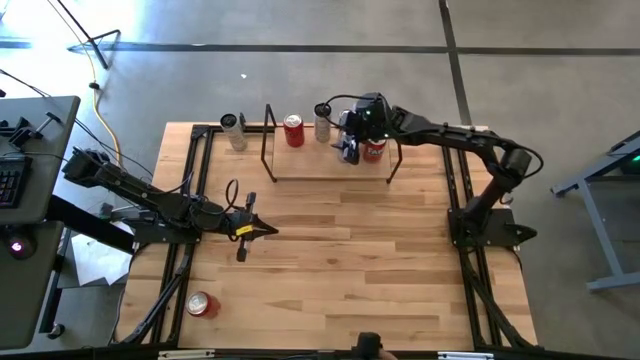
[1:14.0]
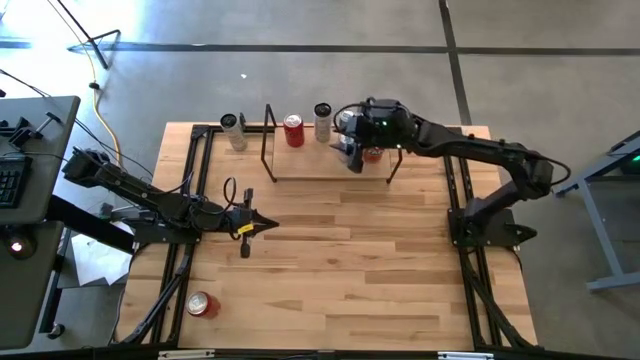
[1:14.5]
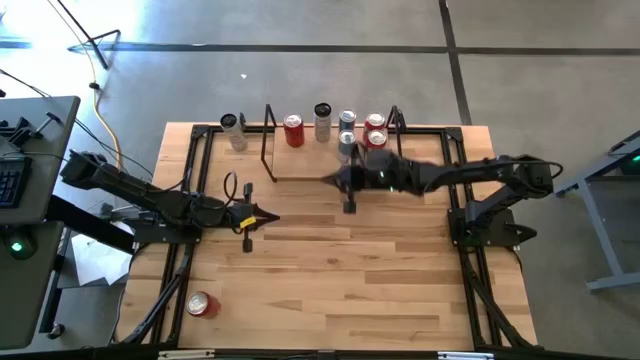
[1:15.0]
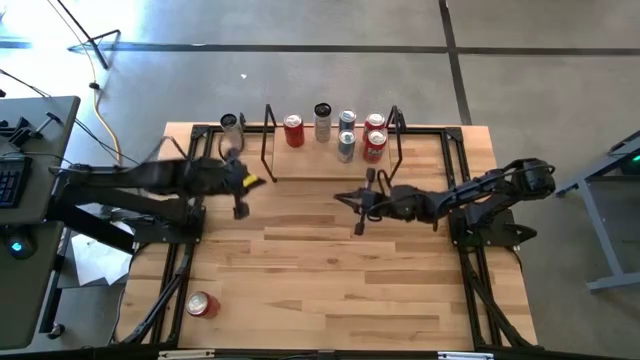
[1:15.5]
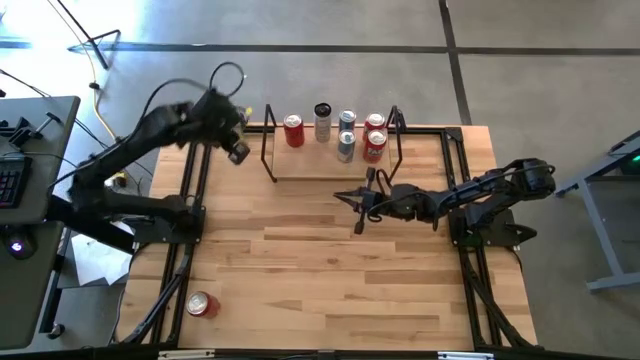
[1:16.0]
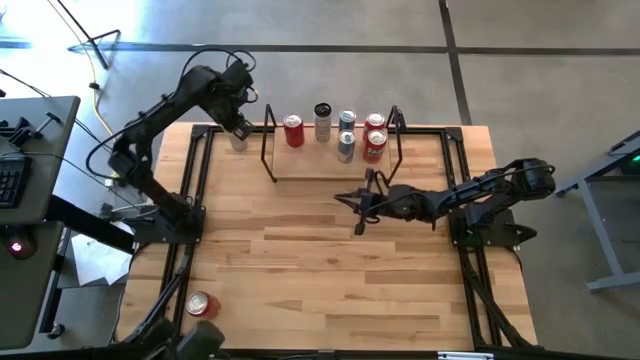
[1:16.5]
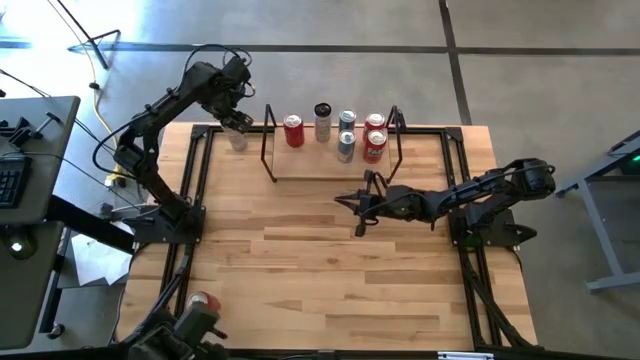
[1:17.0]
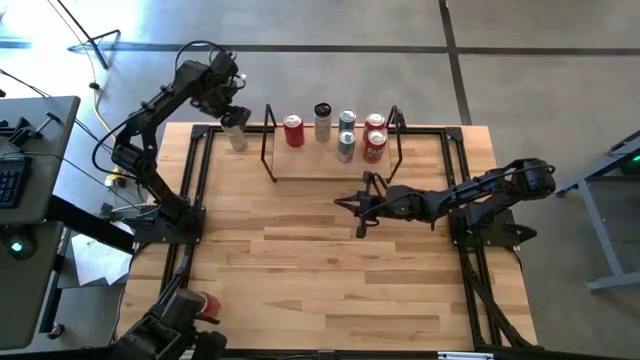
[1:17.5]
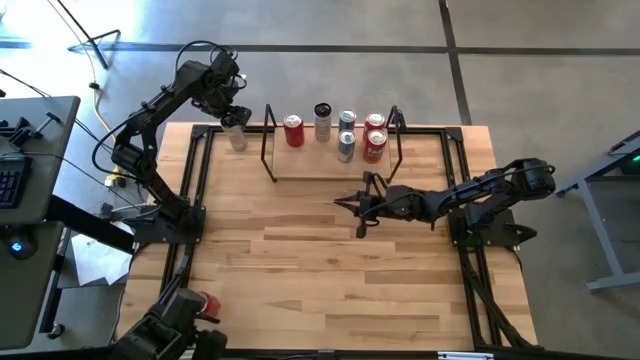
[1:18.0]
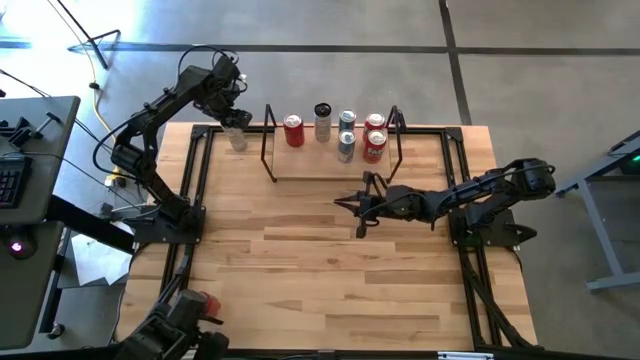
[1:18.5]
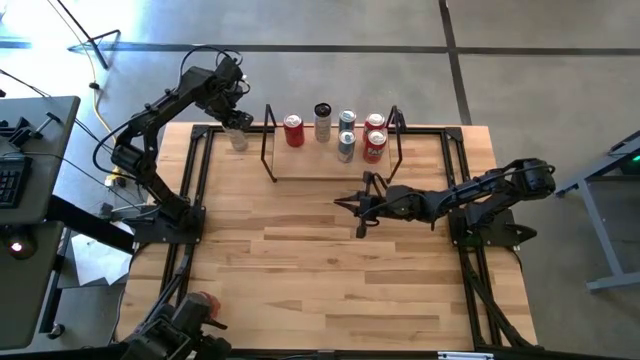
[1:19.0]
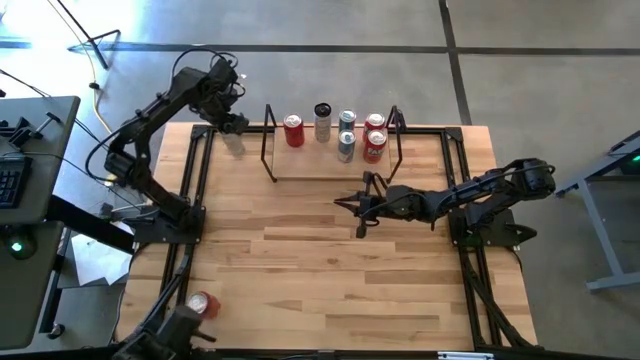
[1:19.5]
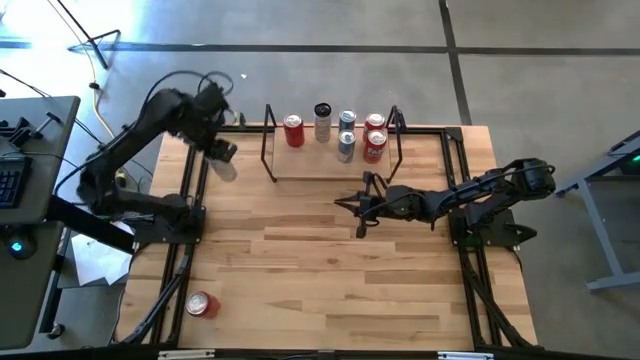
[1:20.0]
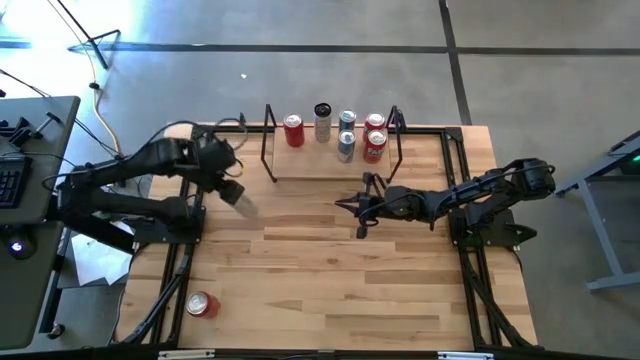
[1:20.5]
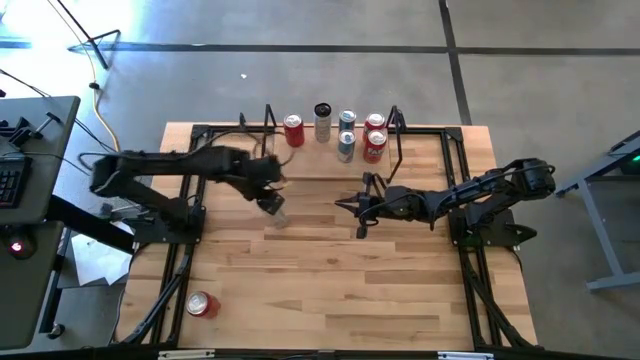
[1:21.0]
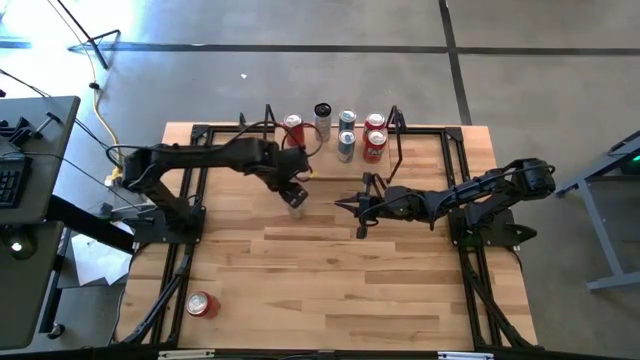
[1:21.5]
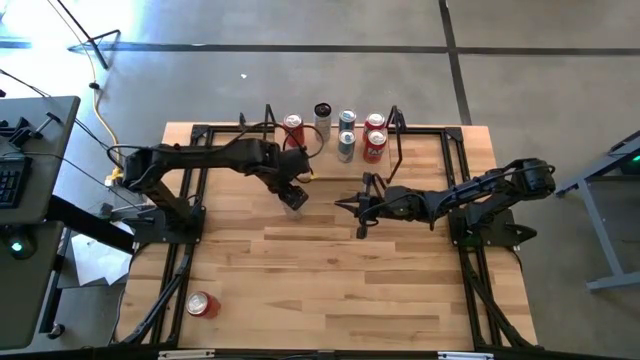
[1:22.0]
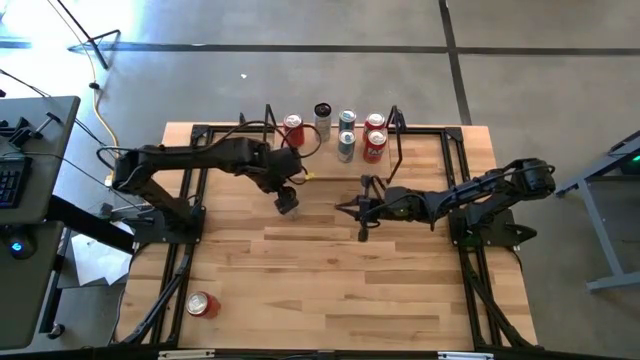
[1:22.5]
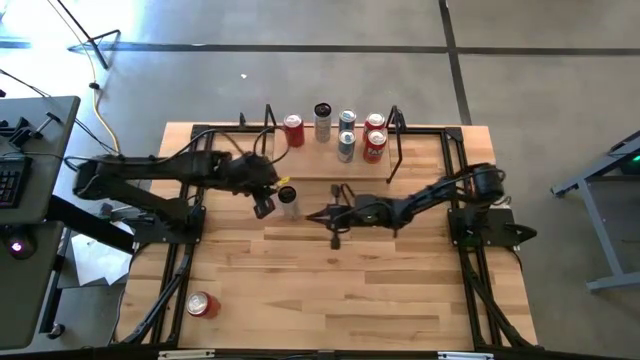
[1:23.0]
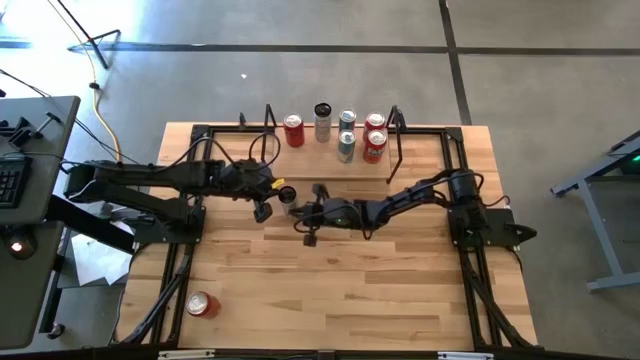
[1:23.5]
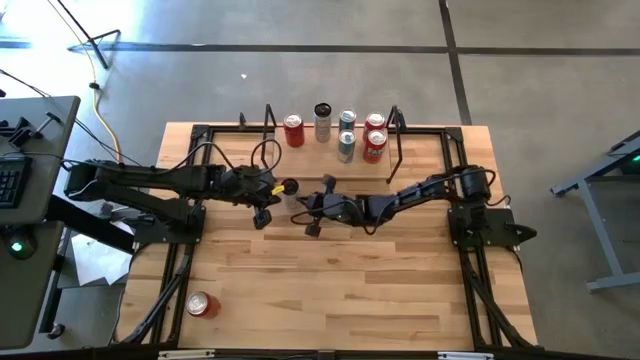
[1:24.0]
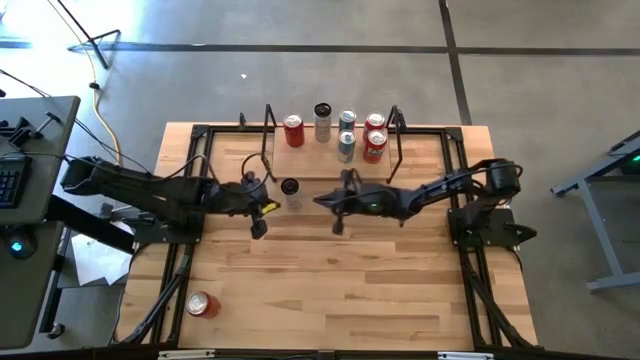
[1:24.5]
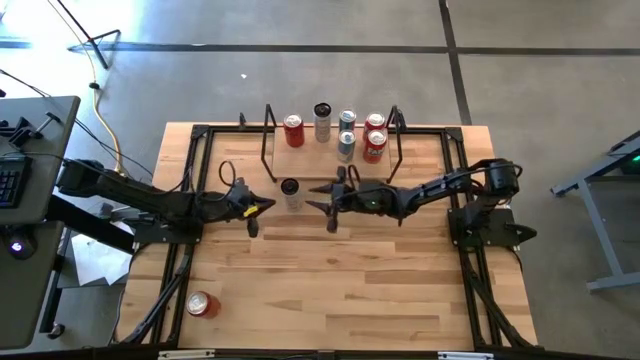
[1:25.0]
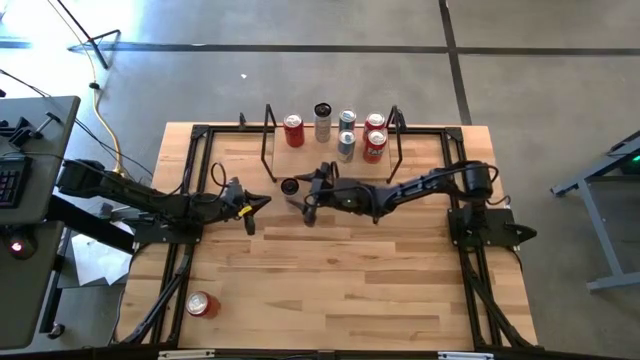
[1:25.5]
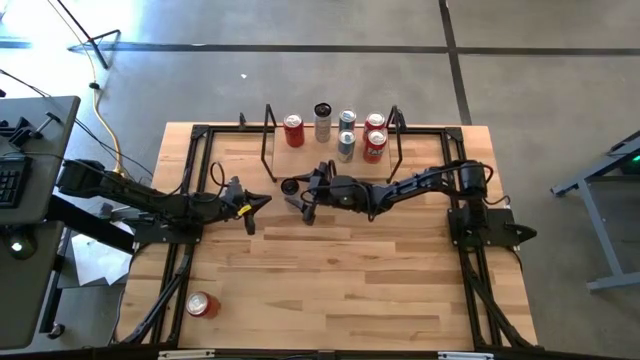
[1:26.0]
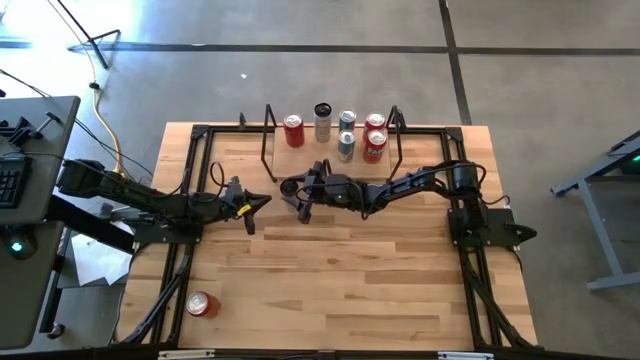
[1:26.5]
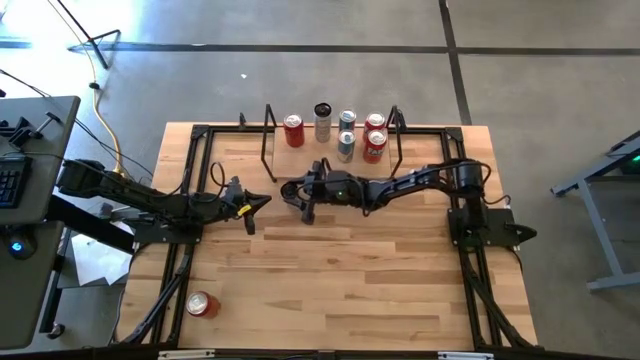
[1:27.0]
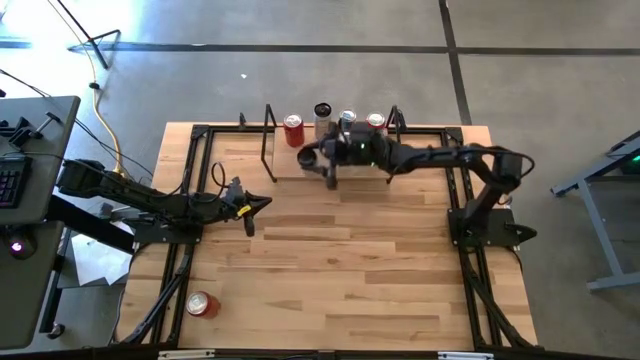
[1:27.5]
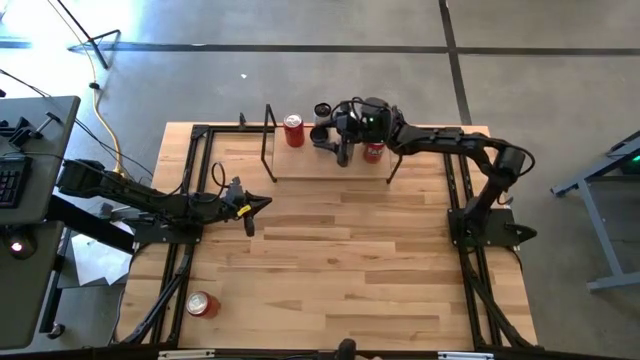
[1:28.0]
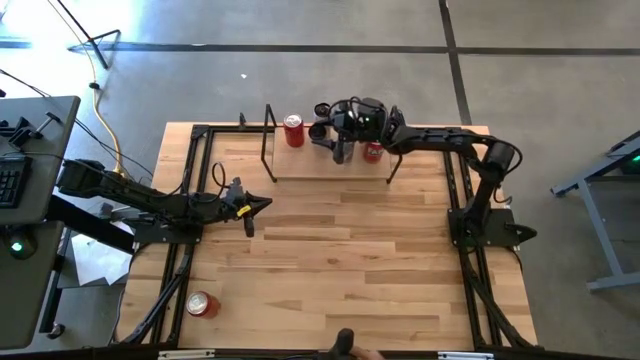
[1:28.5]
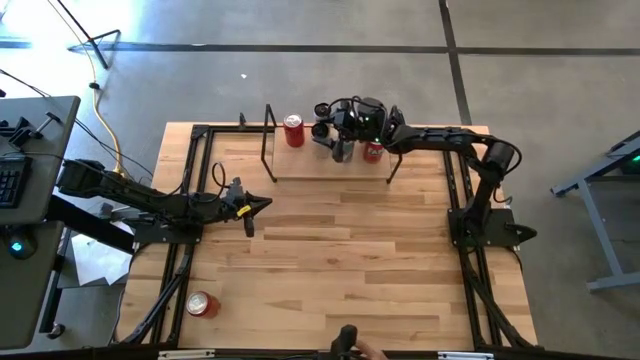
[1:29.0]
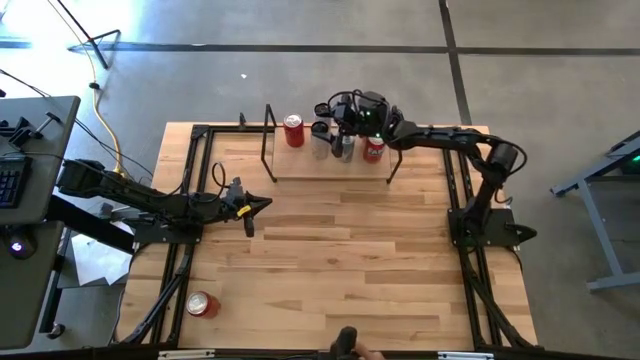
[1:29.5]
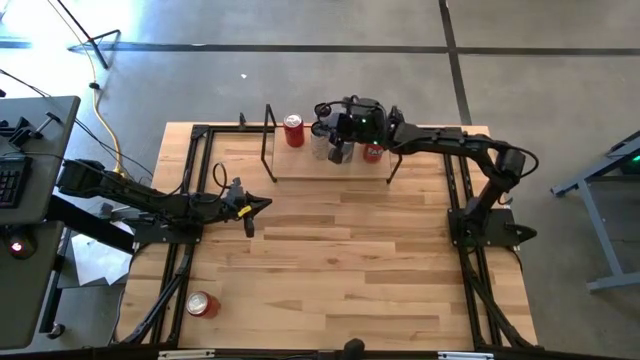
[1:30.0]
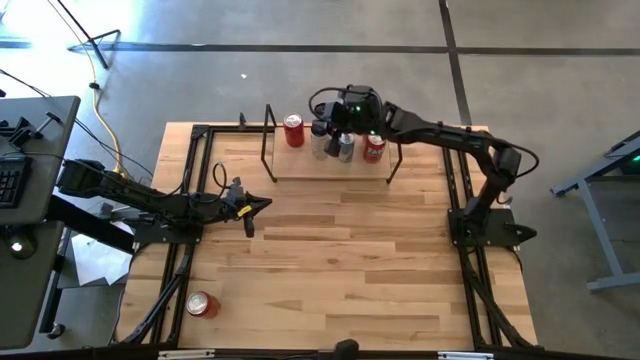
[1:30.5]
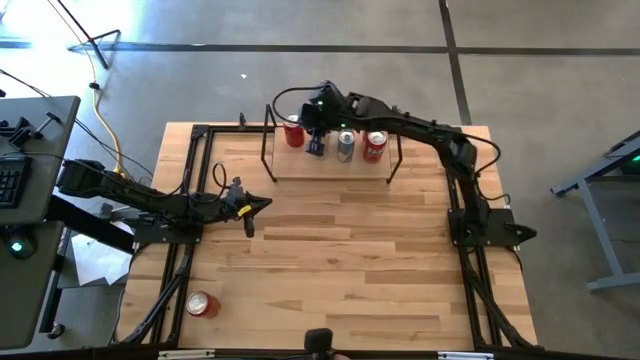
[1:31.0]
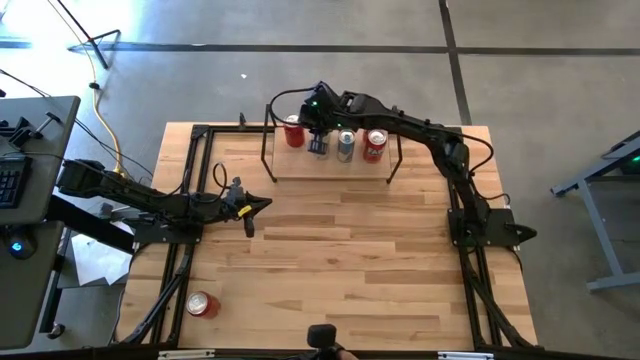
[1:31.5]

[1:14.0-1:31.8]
Task: Place canned beverage on shelf
Put the white yellow soda can on the shelf aligned with the other white yellow soda can

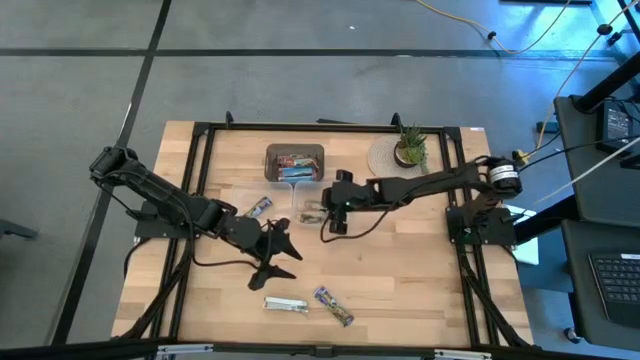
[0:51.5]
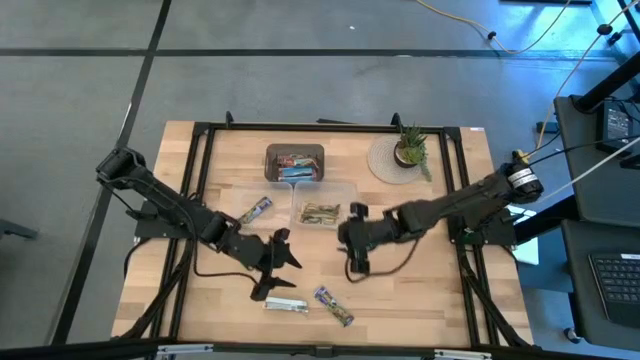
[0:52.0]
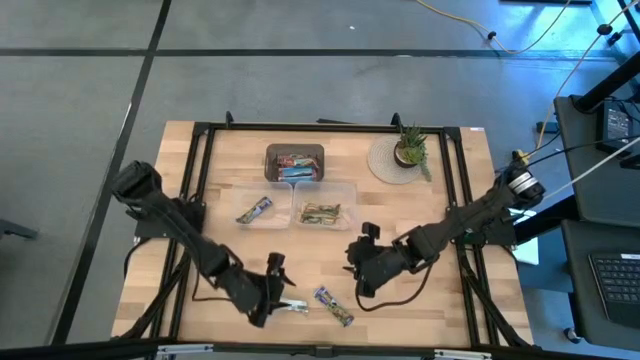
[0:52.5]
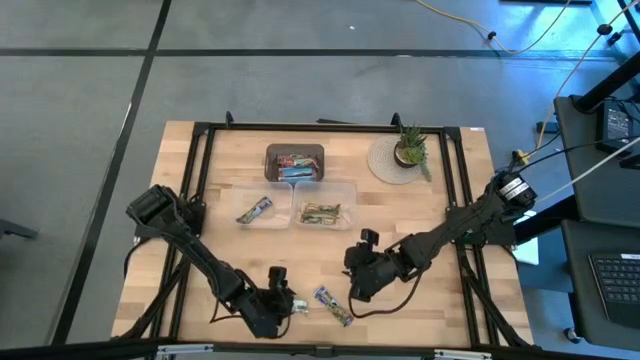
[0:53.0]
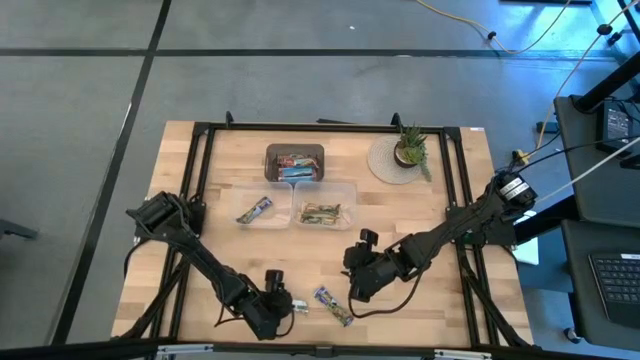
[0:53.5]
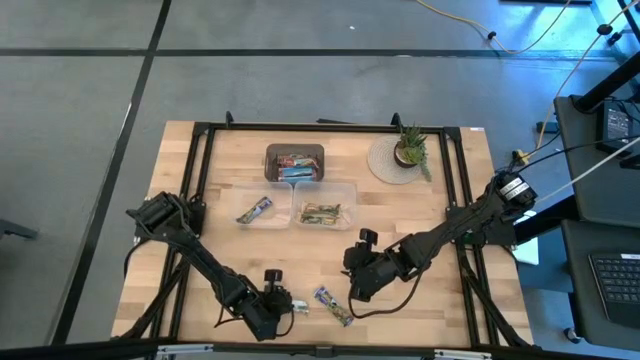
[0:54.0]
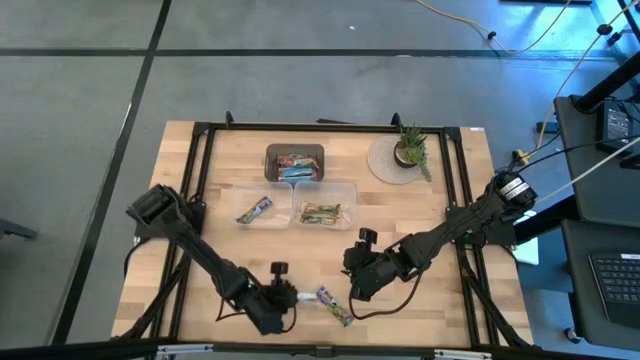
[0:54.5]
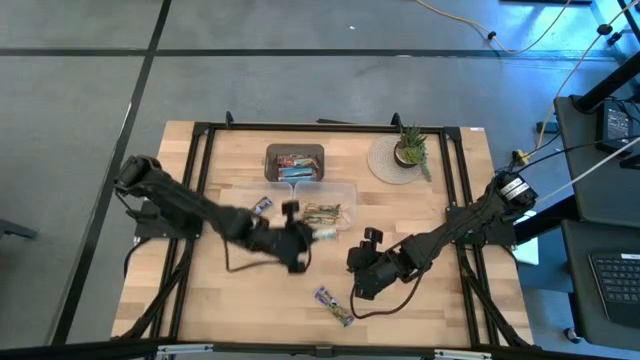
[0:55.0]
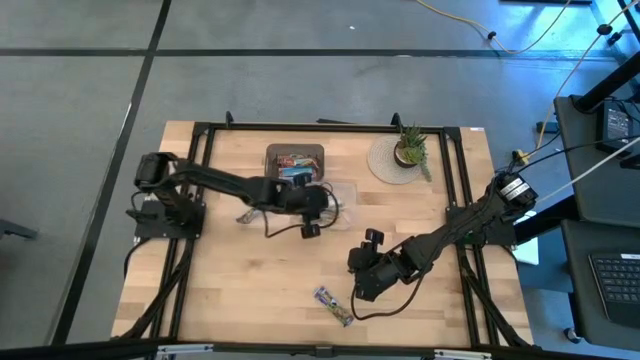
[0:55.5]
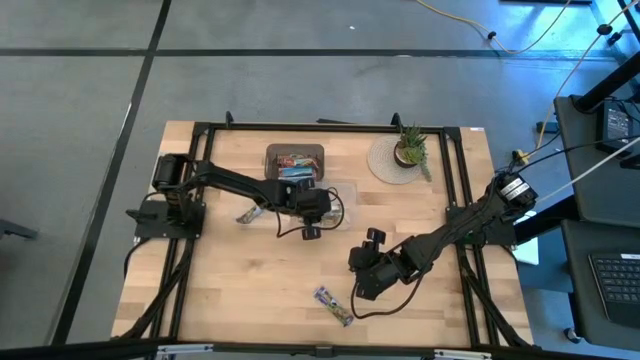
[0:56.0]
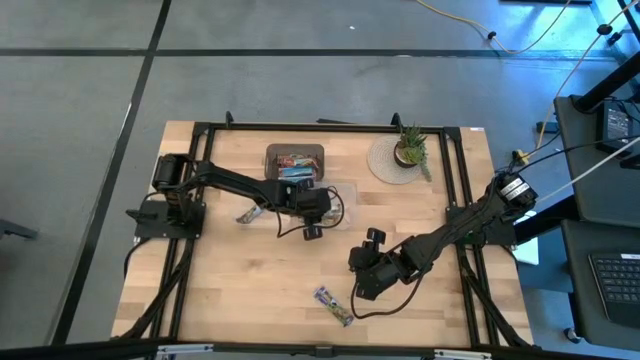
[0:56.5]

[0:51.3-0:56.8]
Task: Pick and place Granola Bars by type
Put the yellow granola bar into the right transparent bin
